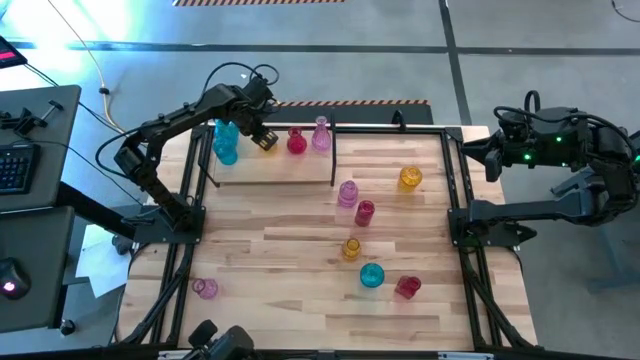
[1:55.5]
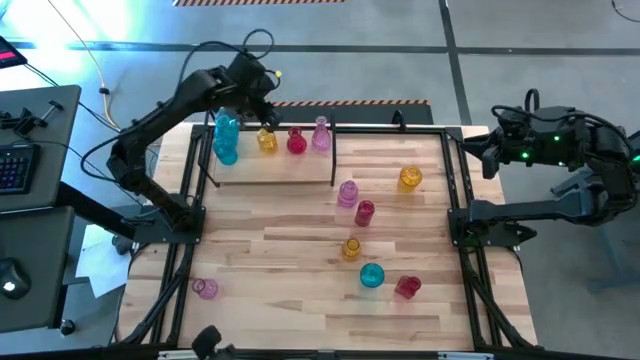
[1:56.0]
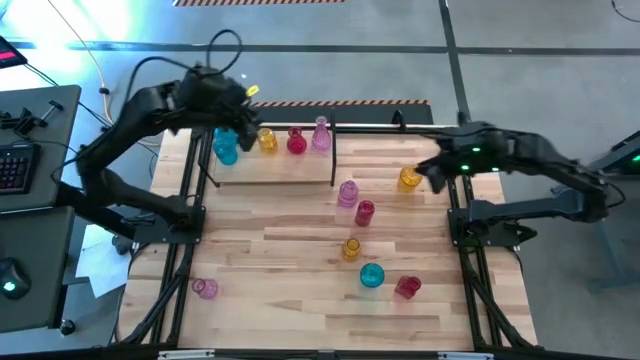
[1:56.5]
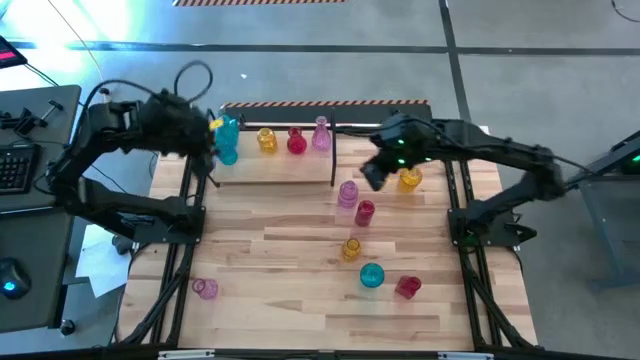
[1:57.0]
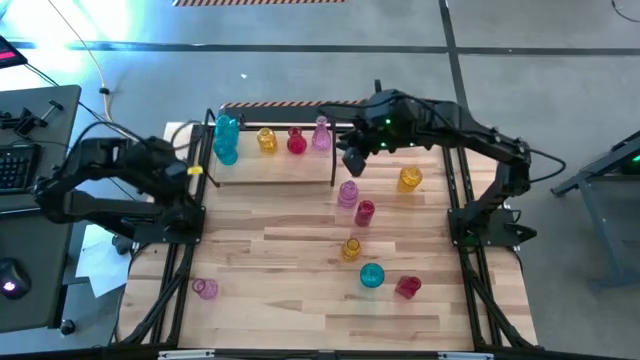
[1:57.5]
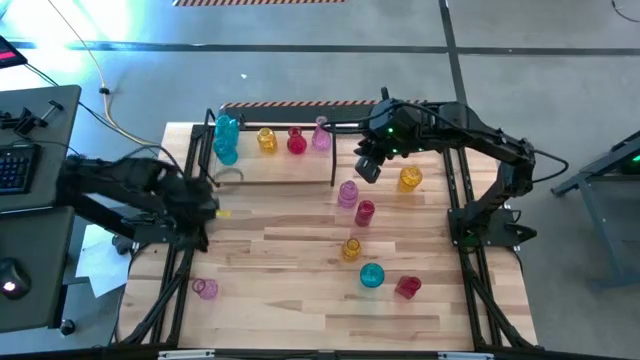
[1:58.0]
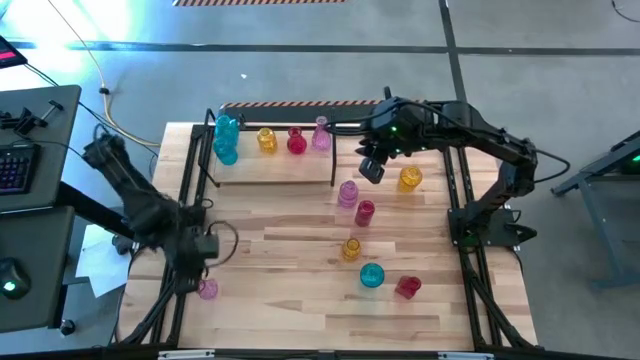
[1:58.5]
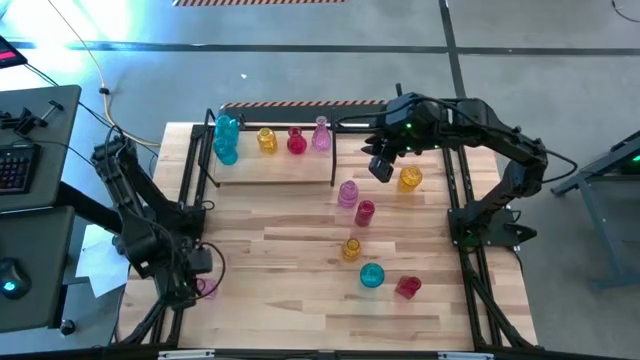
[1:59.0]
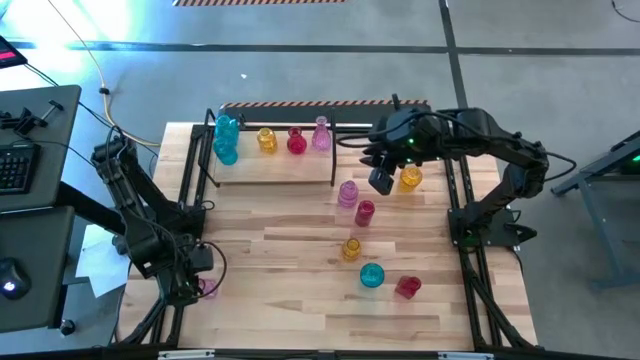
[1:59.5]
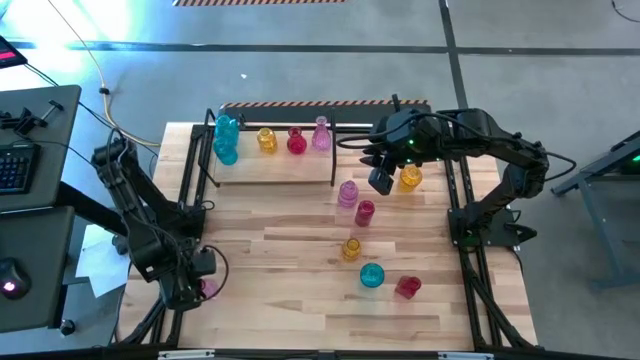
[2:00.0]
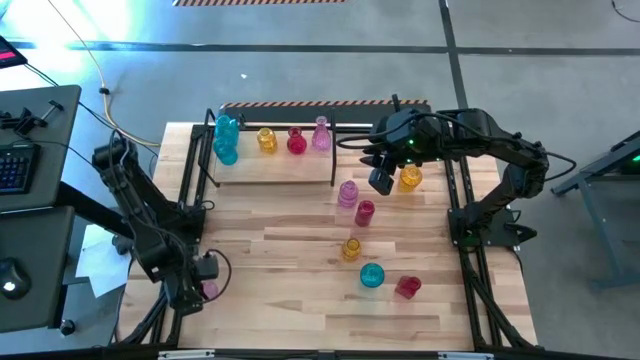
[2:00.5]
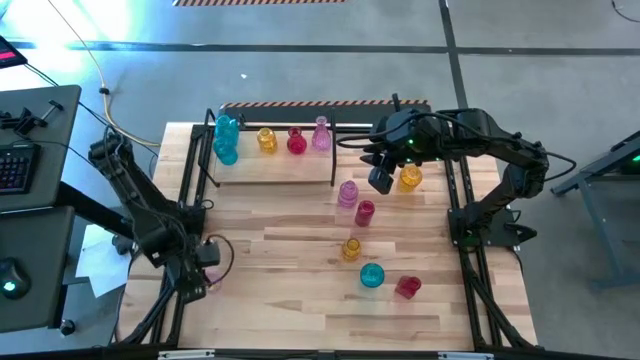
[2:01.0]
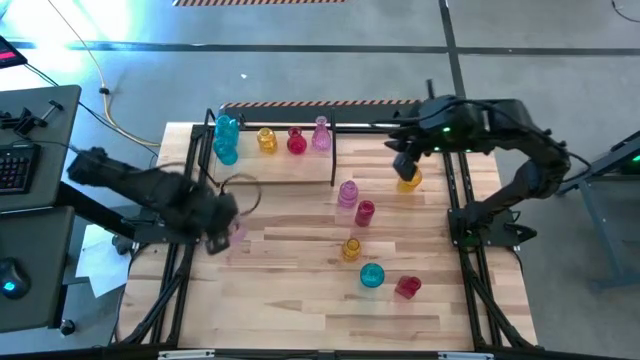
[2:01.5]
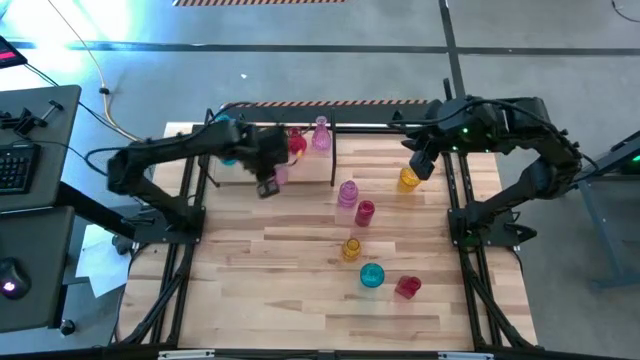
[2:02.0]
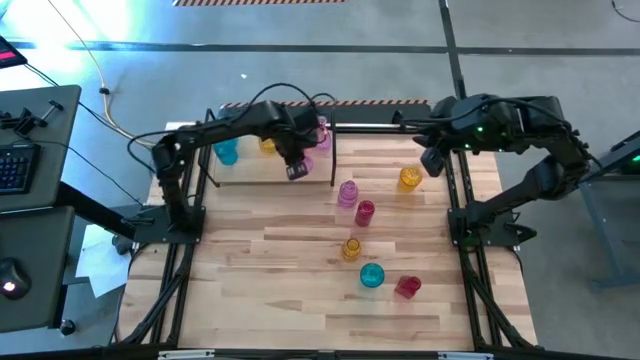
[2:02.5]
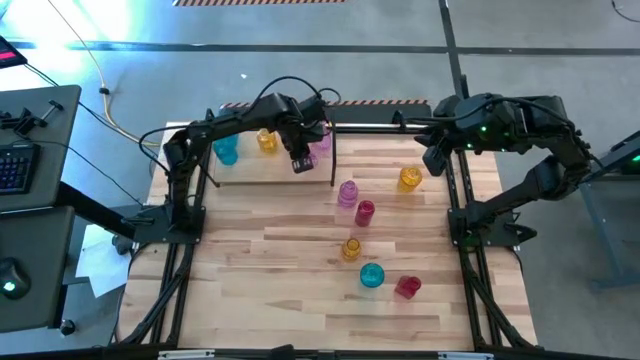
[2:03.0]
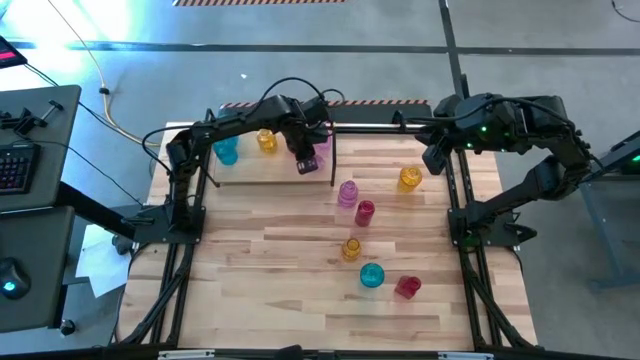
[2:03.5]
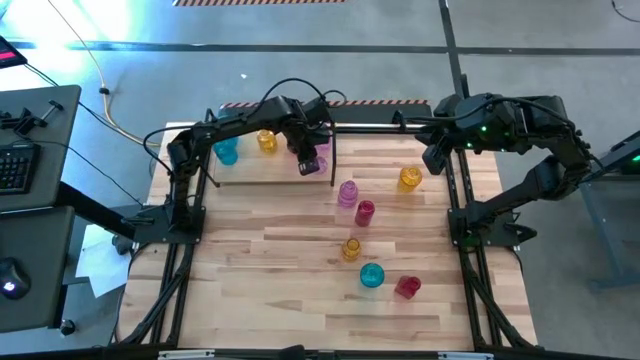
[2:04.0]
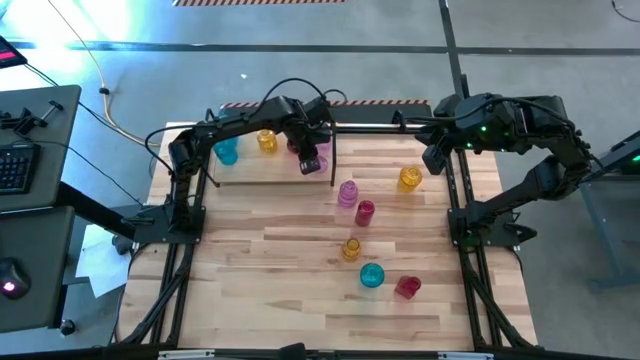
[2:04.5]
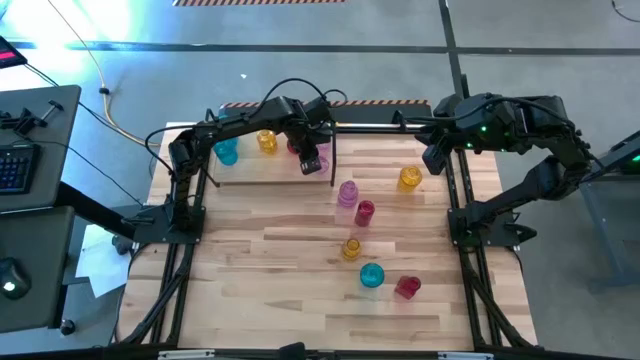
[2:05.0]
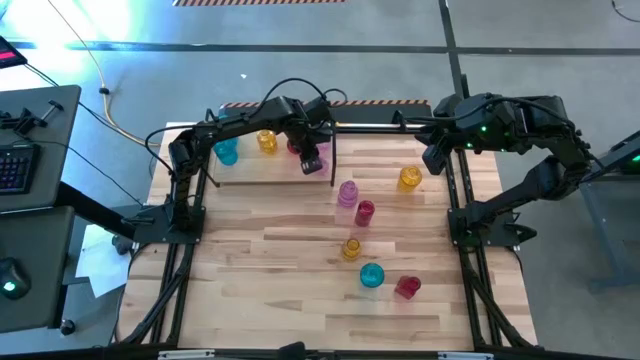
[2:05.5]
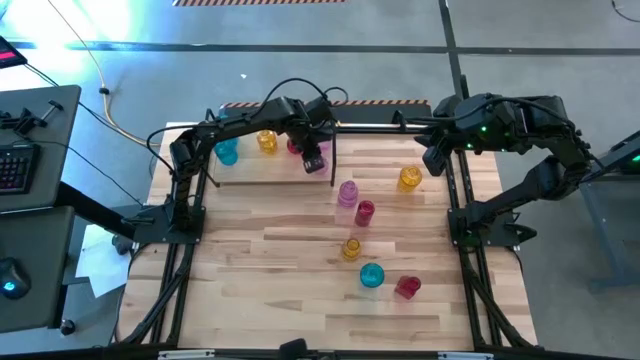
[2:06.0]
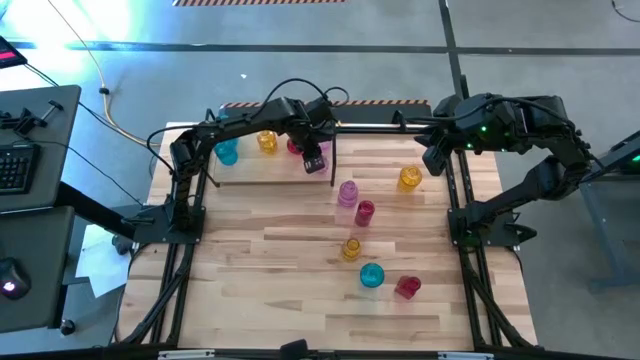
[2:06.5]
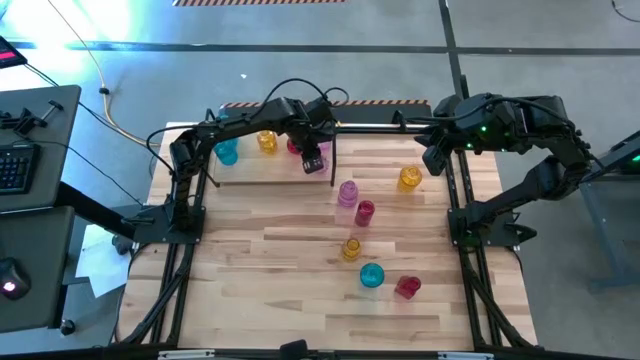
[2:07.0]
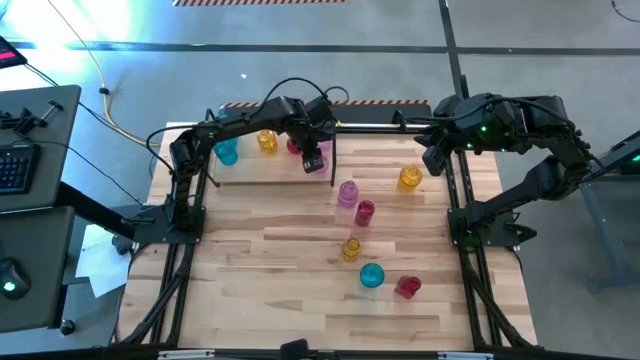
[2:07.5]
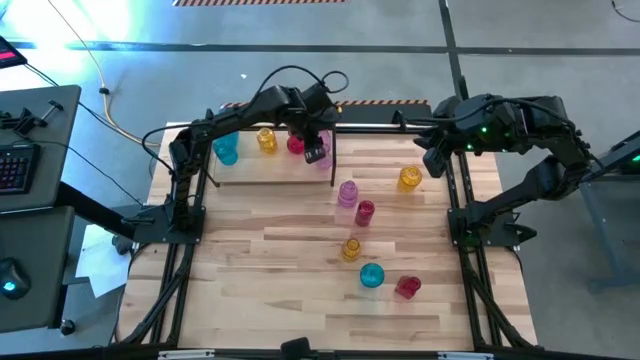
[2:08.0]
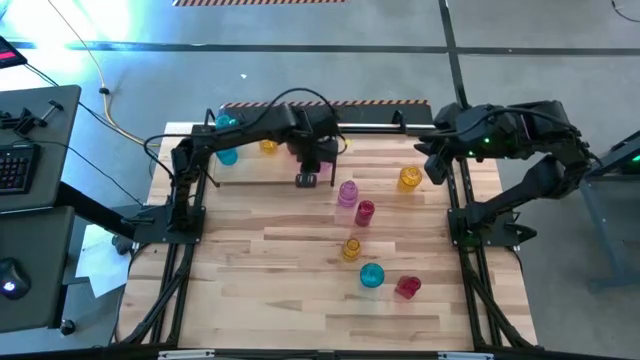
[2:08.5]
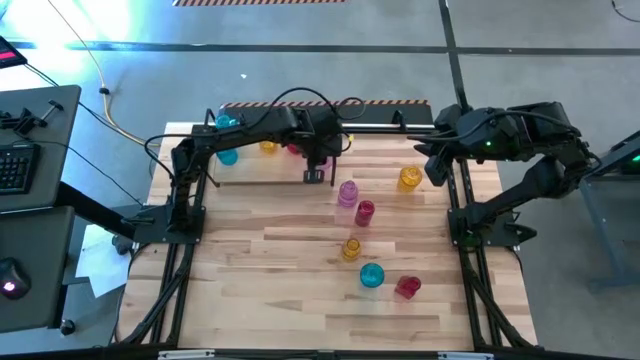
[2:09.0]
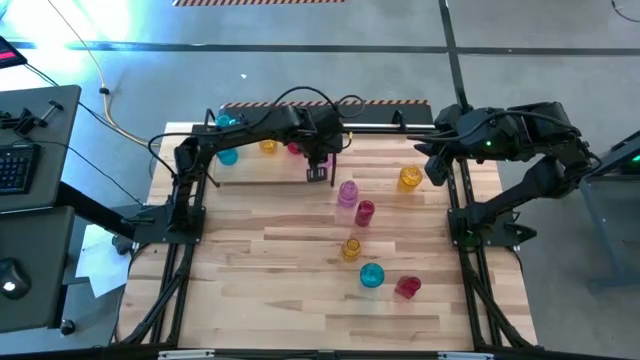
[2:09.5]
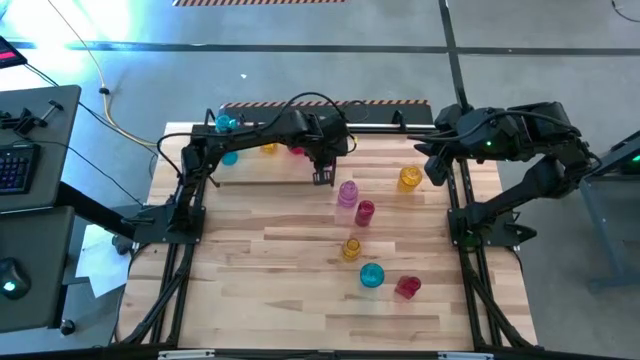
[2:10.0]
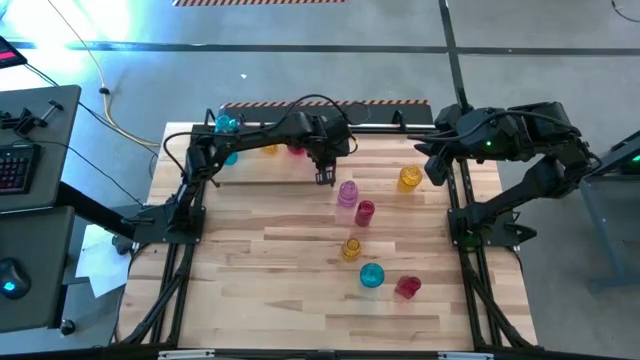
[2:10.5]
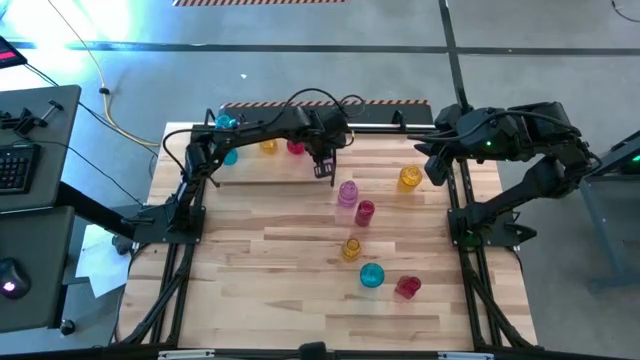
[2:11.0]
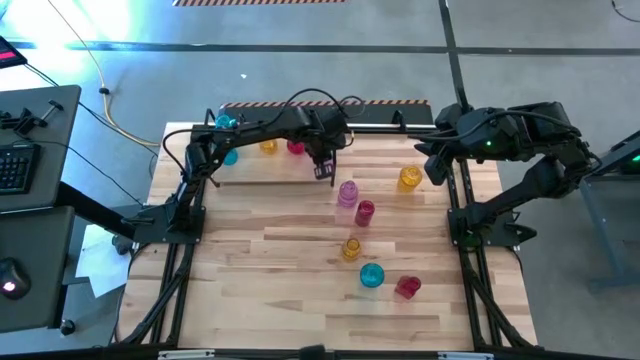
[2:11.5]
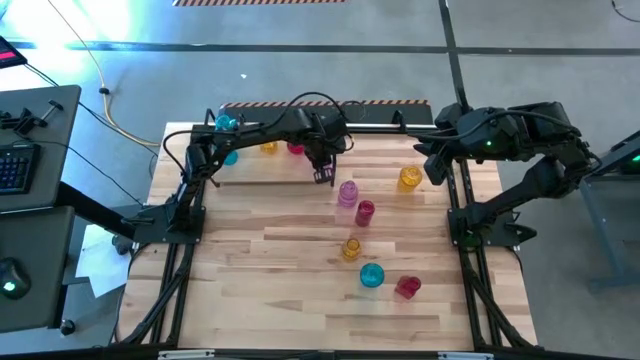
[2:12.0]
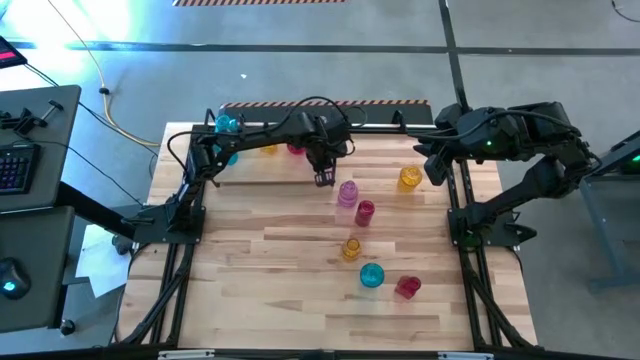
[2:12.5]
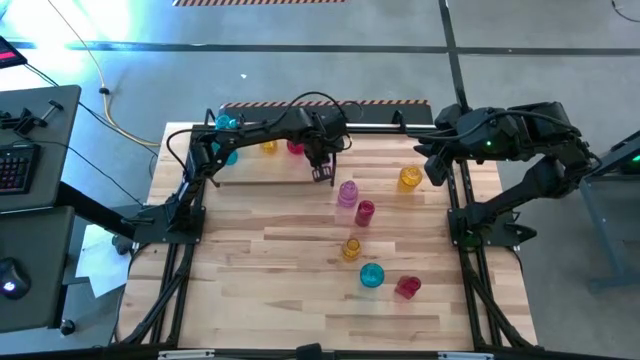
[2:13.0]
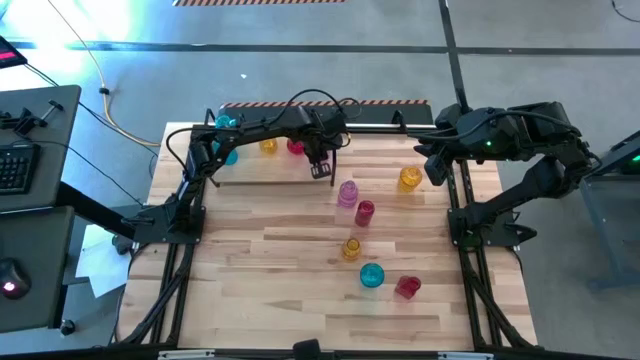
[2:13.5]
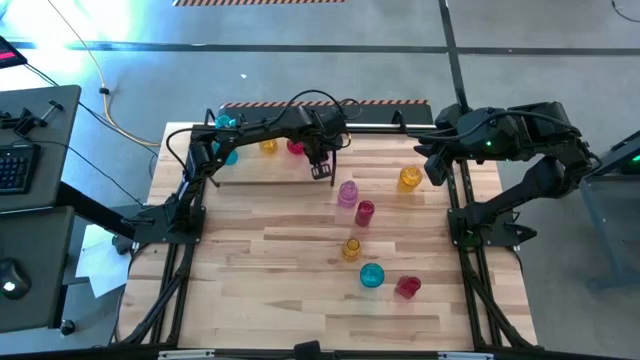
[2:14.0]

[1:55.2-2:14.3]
Task: sort vases onto shelf
Put the bottom purple vase on the shelf aligned with the other purple vase

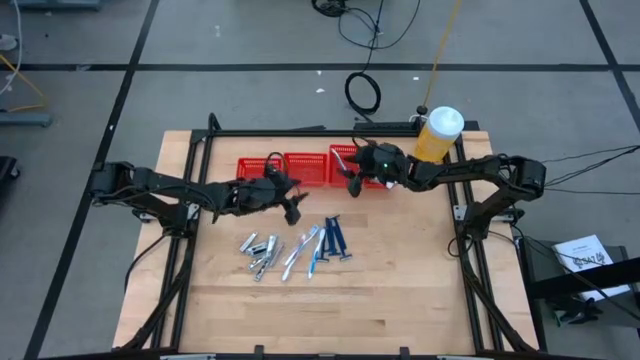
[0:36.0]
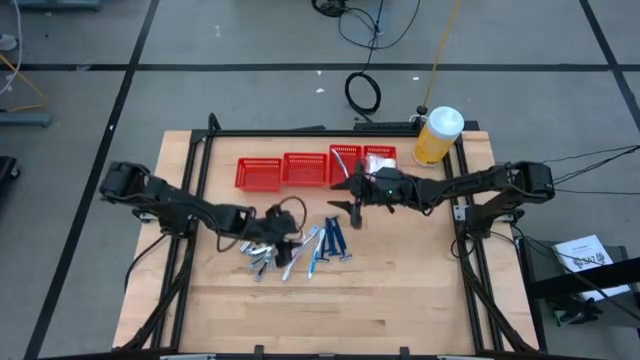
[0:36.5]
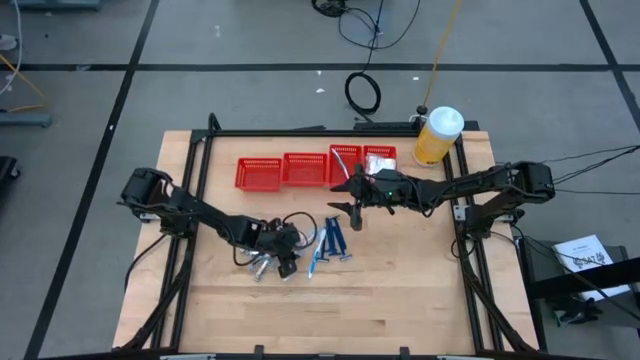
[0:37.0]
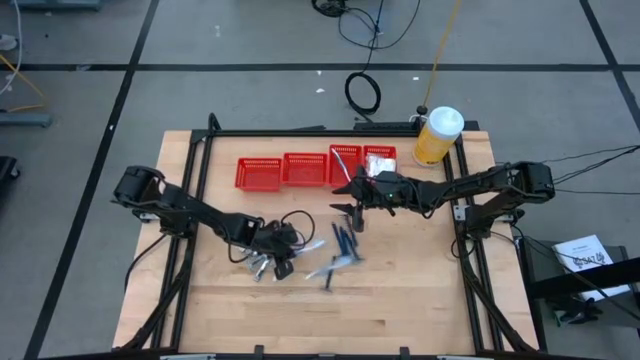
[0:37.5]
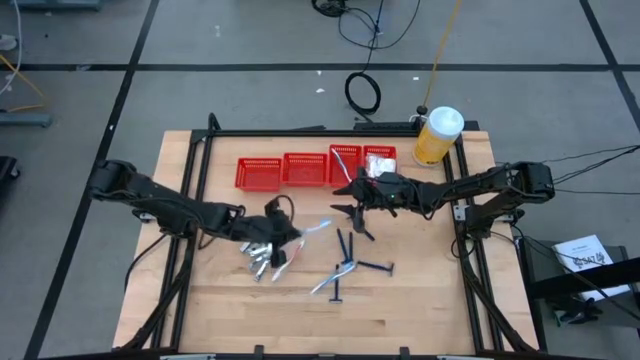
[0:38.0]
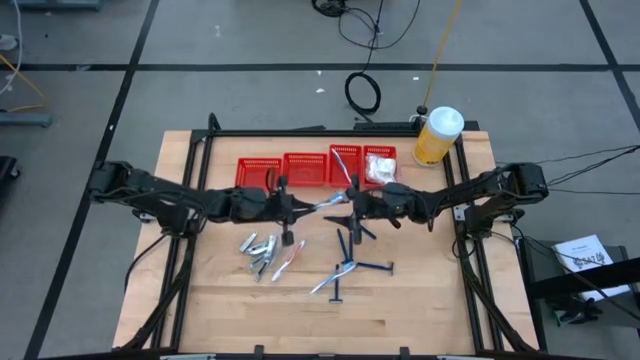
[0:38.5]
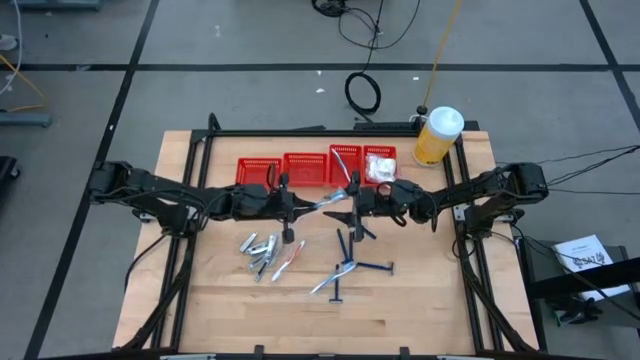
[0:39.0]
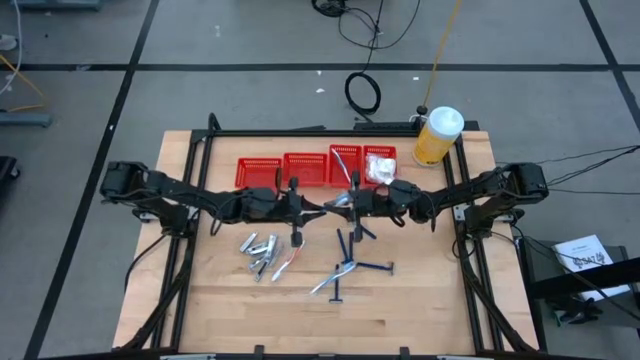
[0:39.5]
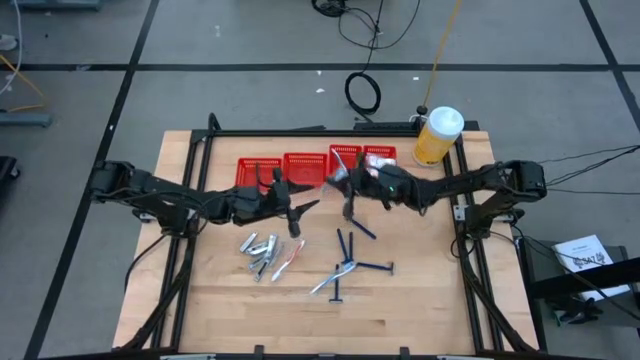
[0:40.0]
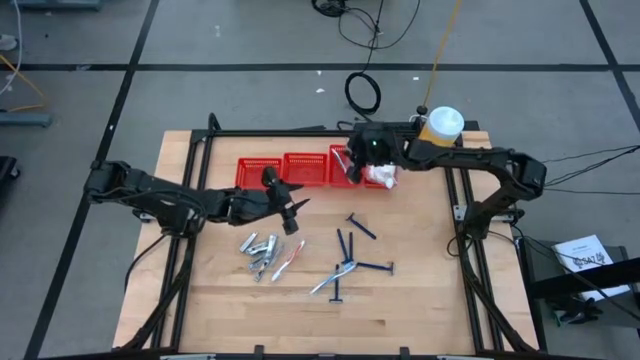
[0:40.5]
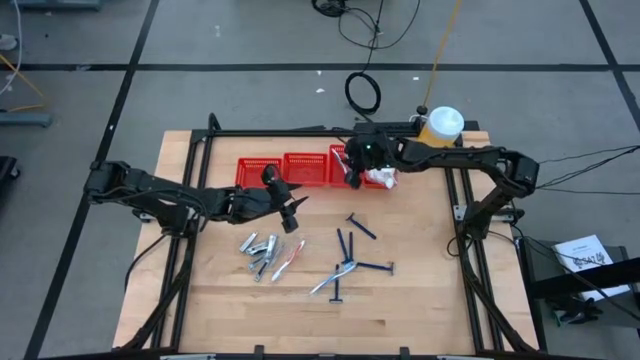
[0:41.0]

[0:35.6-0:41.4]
Task: Pick & Place Travel size toiletries
Put the left blue toothbrush into the vertical left red bin
